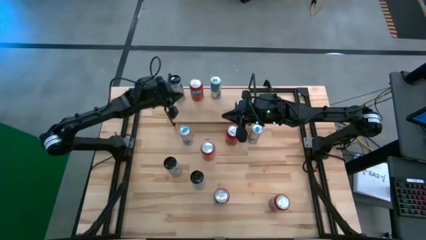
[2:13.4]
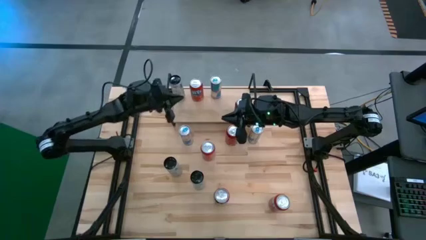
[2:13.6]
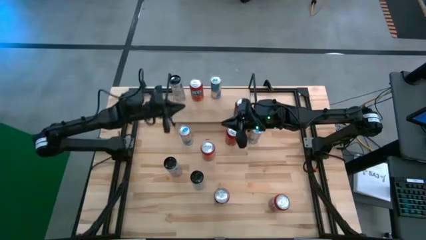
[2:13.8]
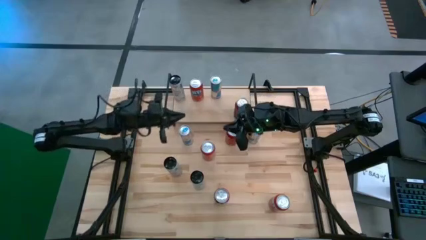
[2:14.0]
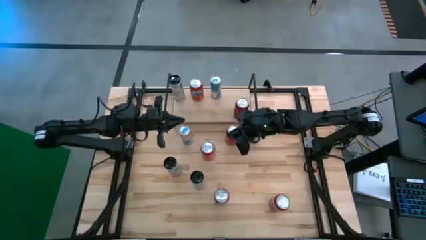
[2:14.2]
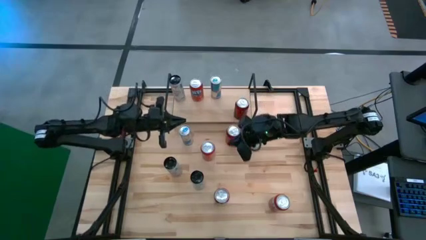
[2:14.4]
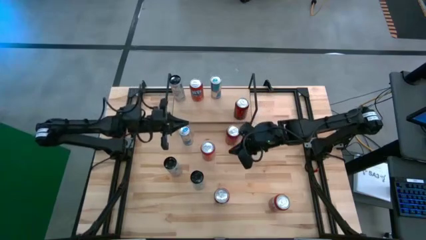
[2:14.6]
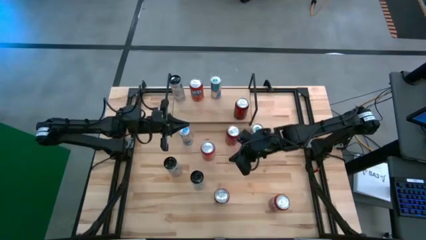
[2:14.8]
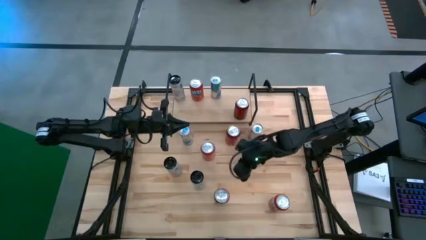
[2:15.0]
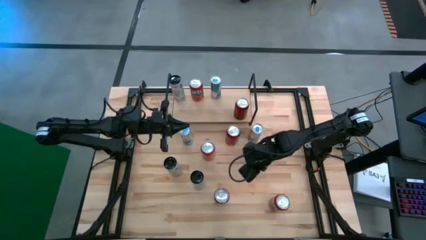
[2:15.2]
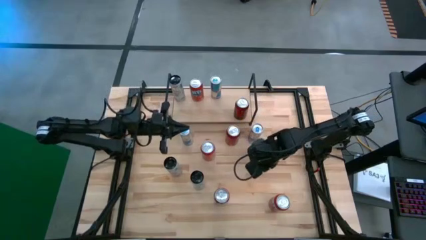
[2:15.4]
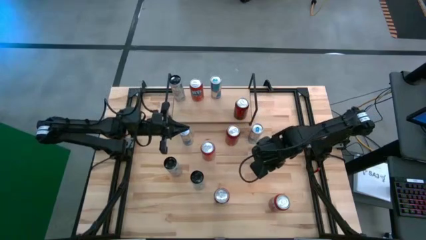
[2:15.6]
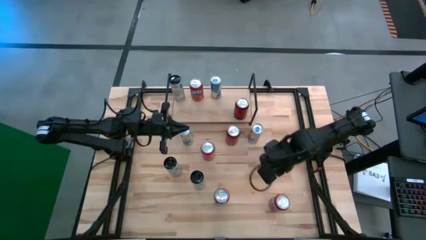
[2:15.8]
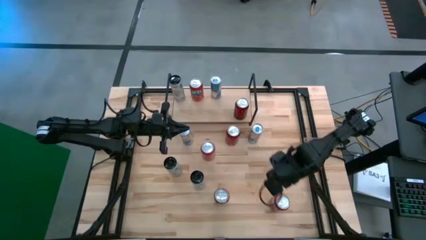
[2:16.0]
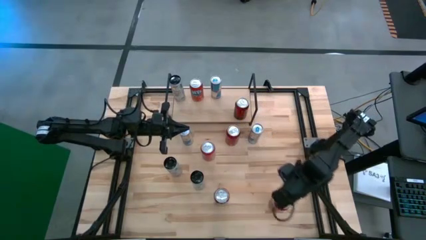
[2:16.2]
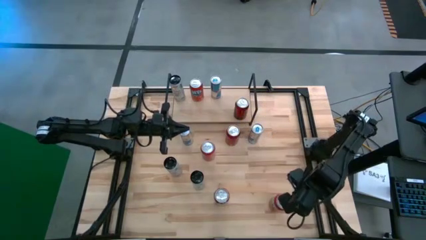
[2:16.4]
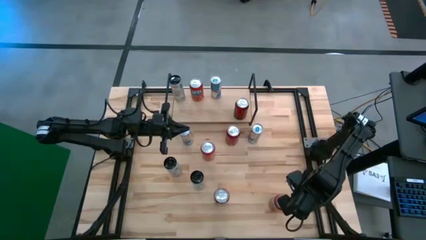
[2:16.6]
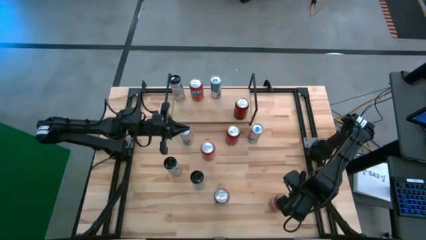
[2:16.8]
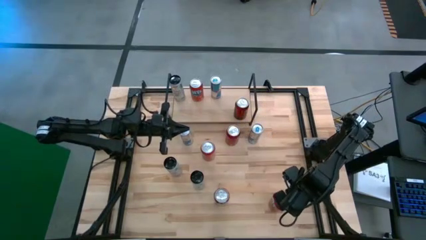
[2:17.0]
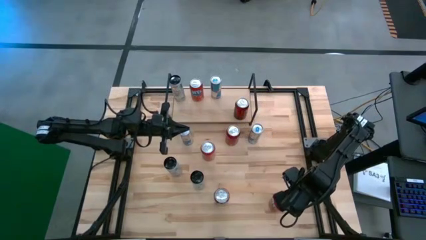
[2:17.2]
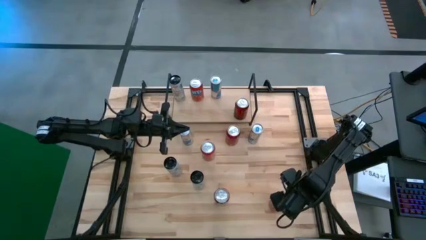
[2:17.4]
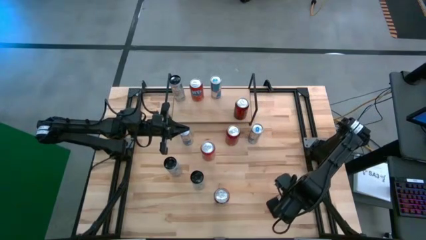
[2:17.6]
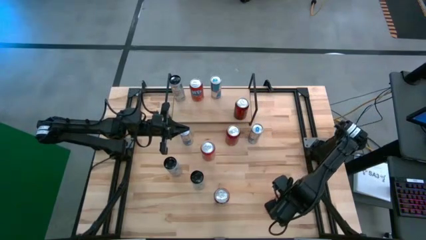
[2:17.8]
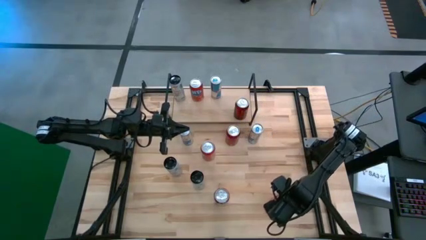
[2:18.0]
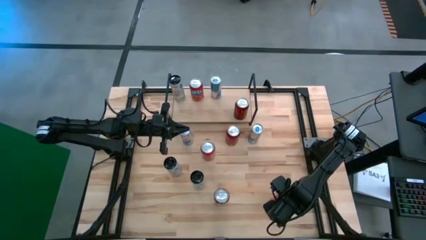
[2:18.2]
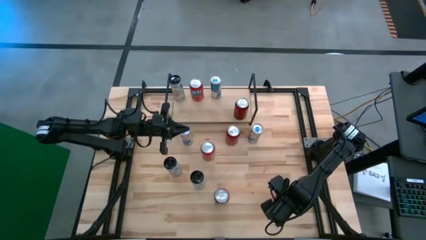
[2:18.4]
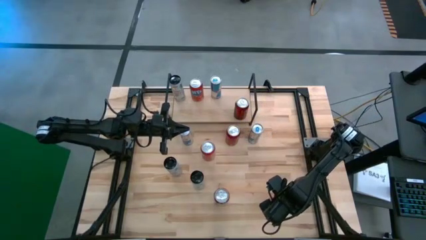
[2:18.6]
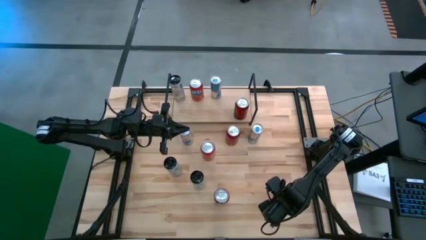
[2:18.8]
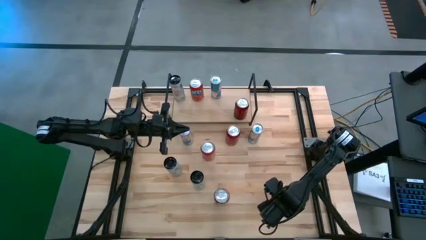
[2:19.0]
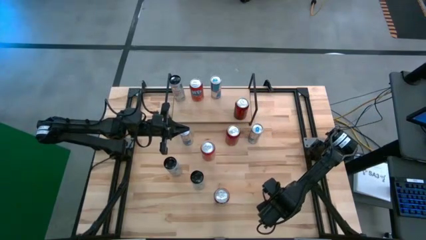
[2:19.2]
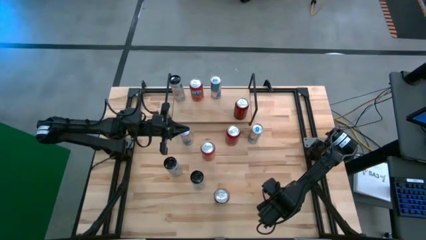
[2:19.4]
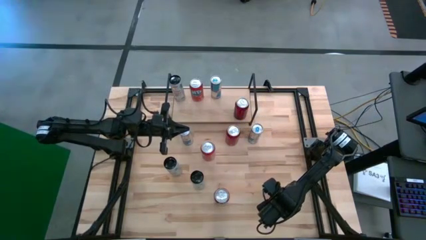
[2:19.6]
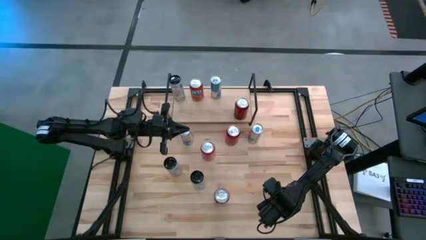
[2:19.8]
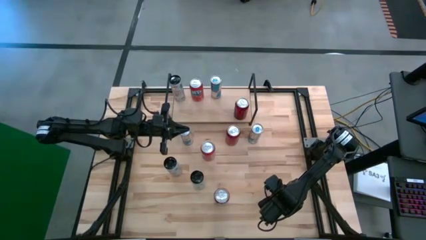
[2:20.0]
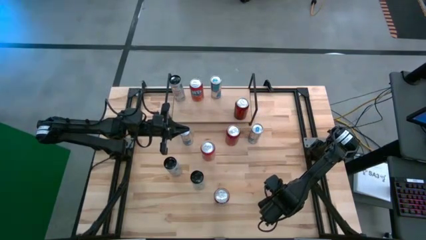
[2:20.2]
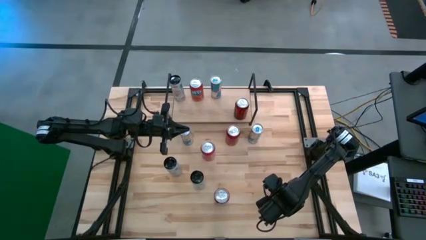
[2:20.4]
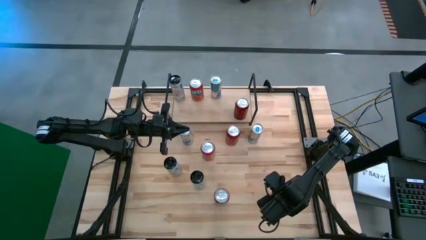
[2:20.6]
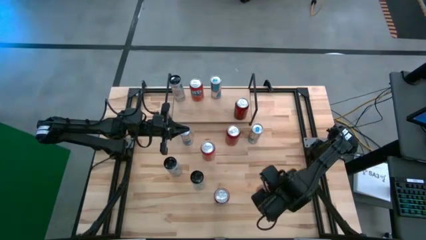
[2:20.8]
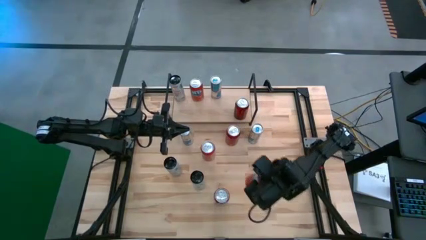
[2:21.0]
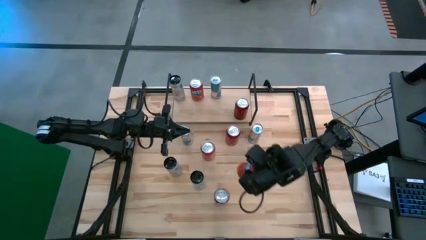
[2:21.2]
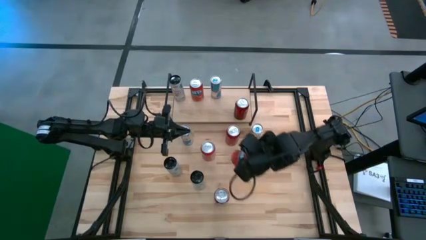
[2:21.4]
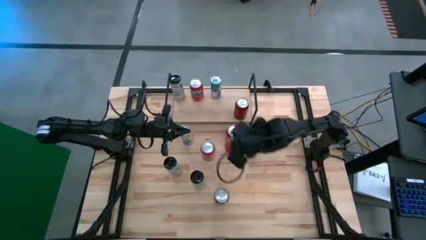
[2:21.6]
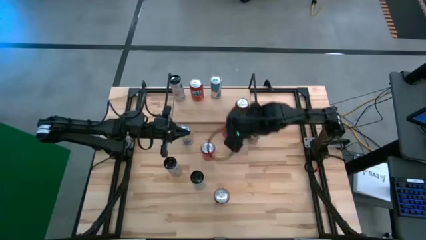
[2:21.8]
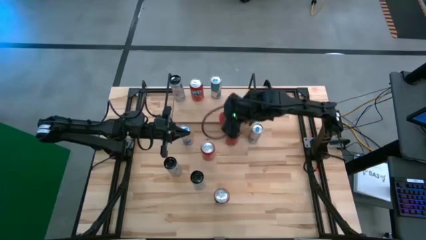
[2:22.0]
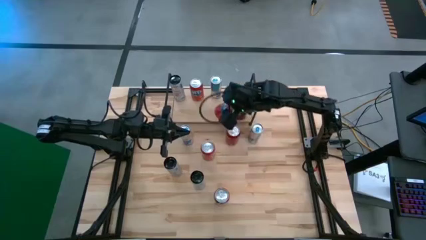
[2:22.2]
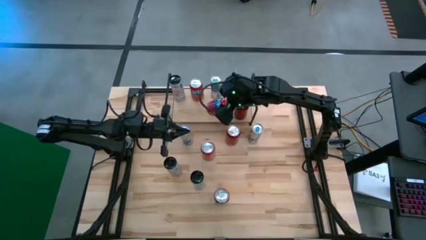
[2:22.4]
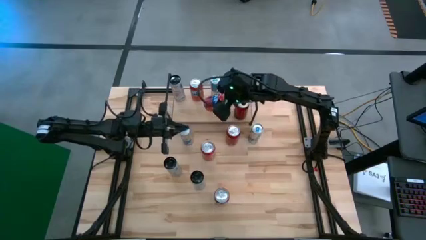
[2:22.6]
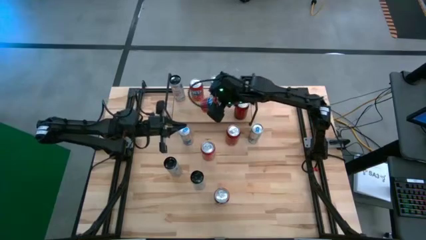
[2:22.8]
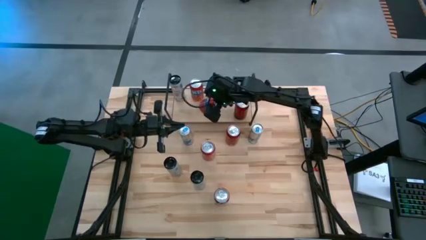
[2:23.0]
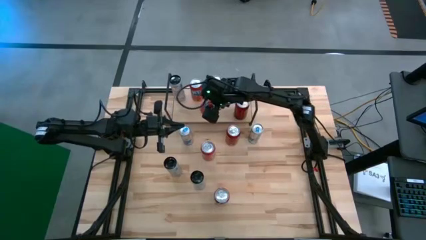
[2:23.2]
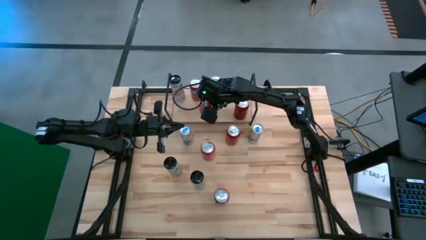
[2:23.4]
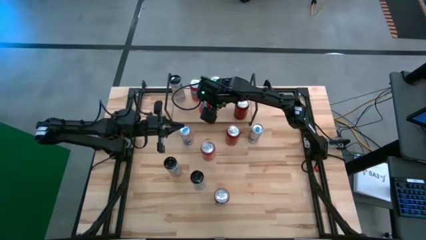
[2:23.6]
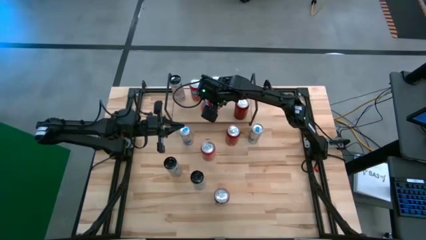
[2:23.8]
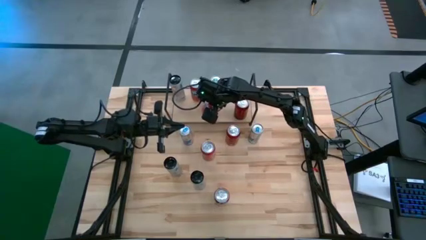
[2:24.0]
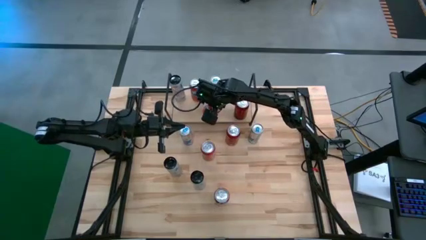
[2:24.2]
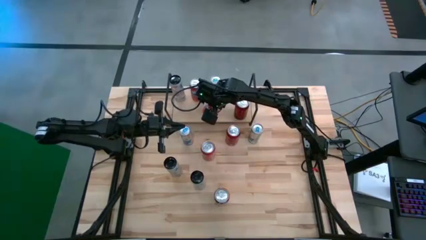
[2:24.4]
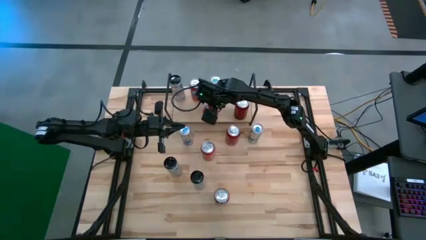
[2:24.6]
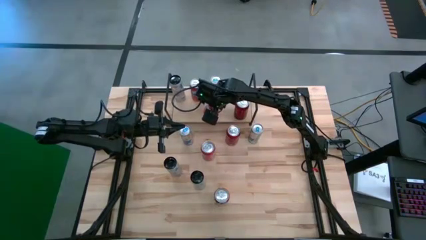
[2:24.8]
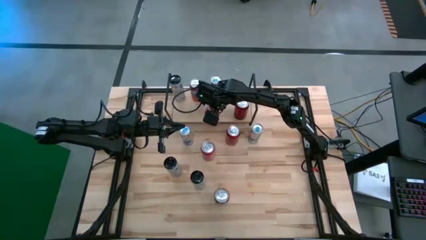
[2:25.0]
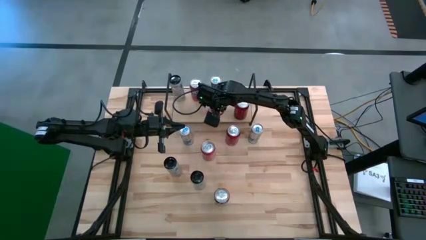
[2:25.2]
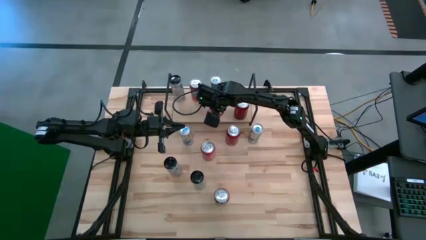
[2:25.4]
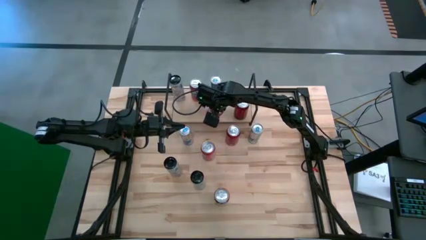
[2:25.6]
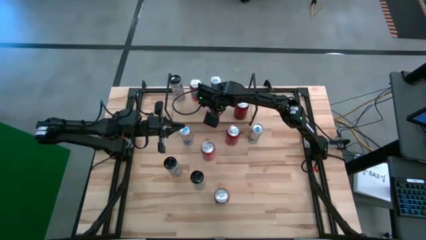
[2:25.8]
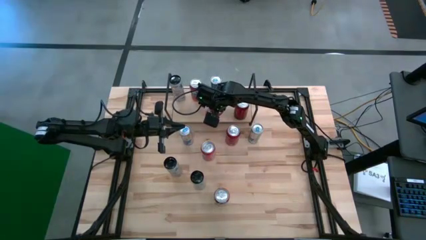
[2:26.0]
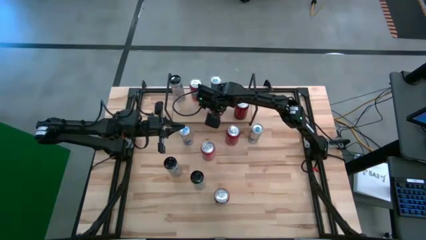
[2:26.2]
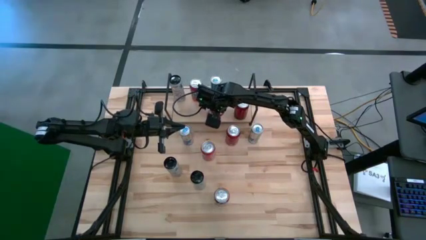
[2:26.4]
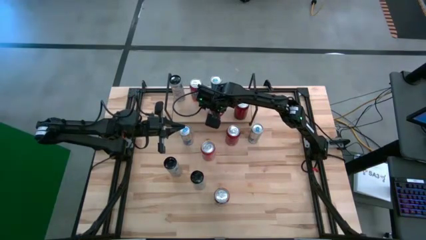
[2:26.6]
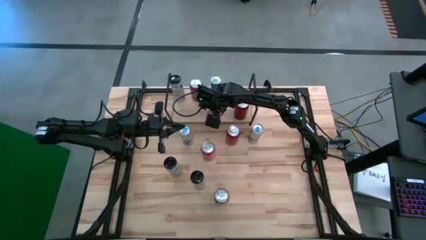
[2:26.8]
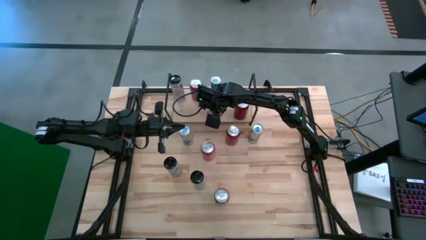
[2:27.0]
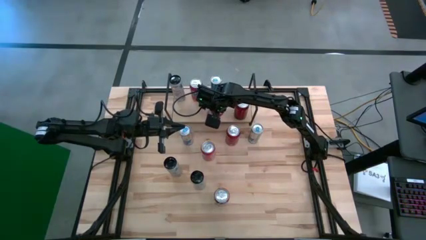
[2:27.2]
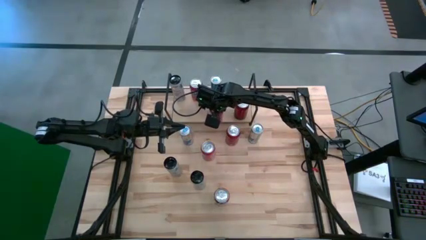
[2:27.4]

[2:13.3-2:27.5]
Task: Place canned beverage on shelf
Put the bottom orange soda can on the shelf aligned with the other orange soda can
